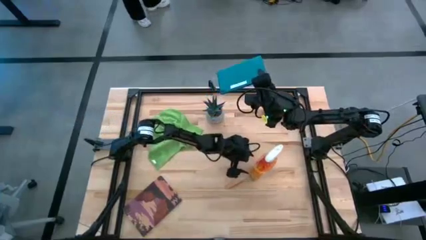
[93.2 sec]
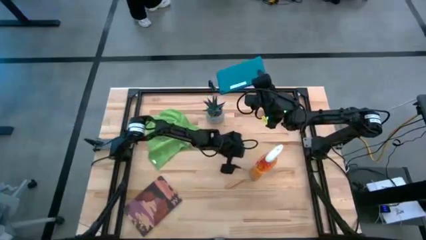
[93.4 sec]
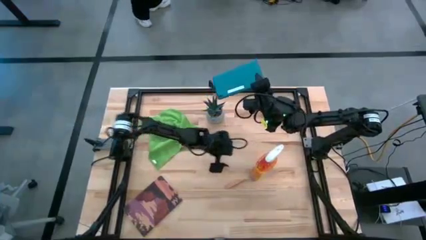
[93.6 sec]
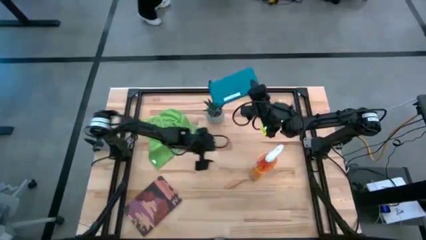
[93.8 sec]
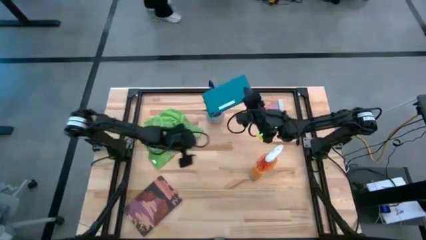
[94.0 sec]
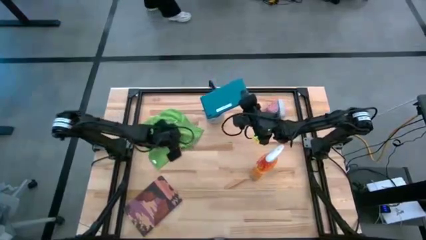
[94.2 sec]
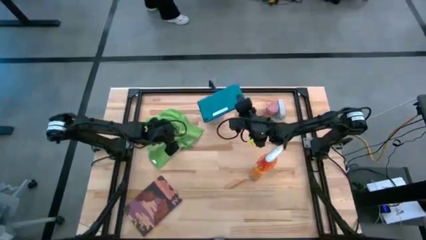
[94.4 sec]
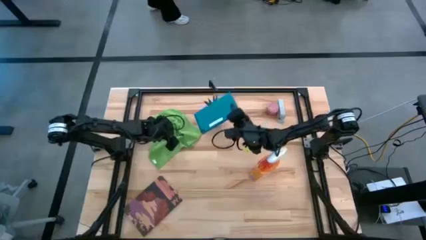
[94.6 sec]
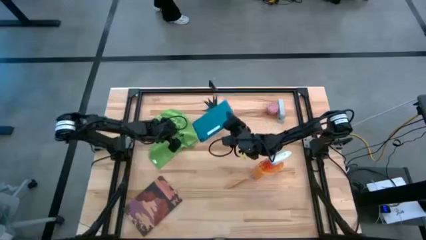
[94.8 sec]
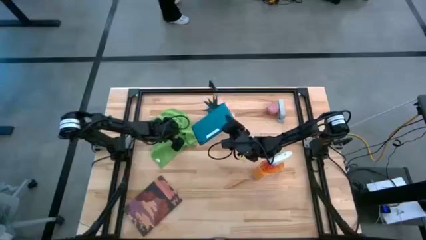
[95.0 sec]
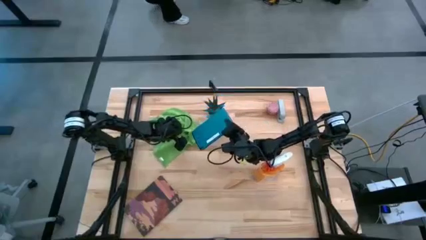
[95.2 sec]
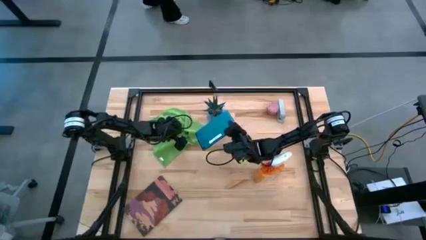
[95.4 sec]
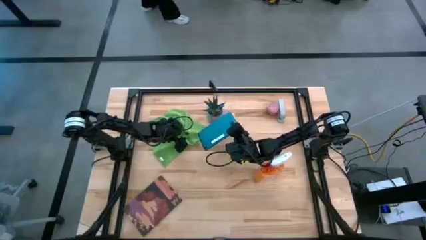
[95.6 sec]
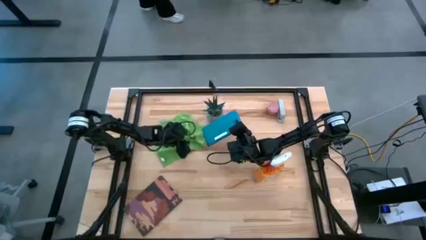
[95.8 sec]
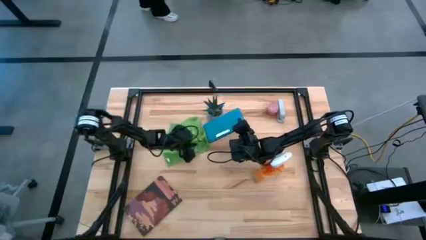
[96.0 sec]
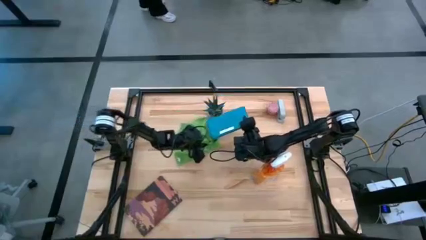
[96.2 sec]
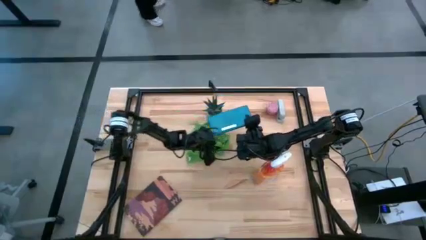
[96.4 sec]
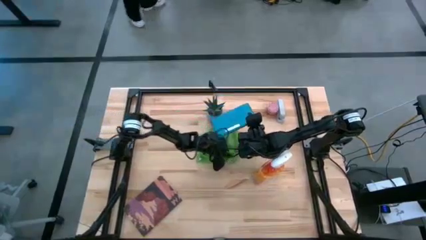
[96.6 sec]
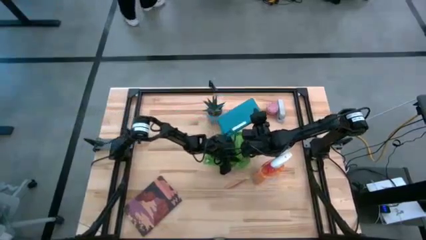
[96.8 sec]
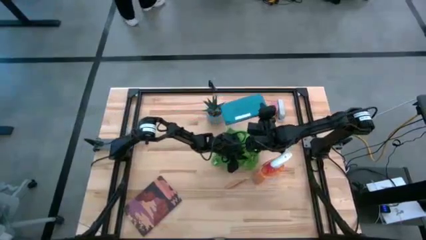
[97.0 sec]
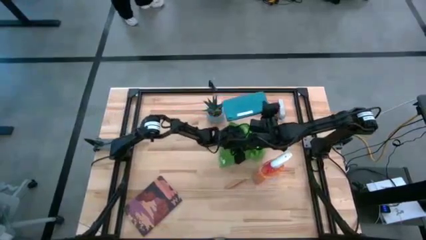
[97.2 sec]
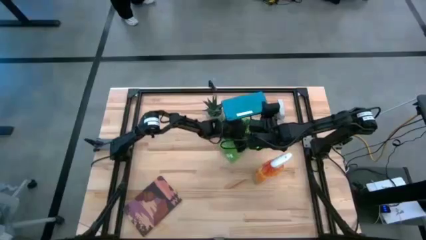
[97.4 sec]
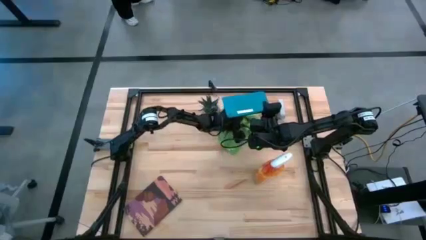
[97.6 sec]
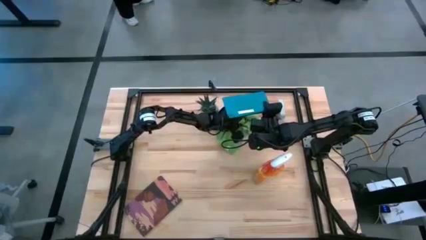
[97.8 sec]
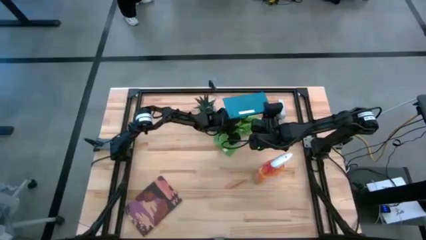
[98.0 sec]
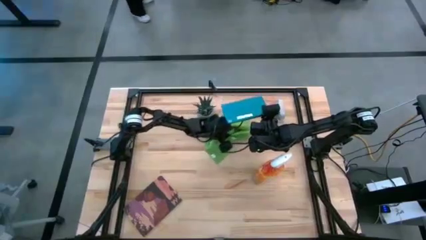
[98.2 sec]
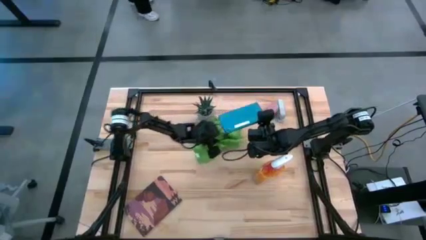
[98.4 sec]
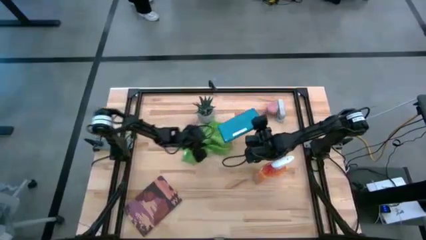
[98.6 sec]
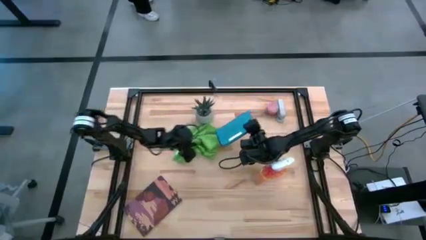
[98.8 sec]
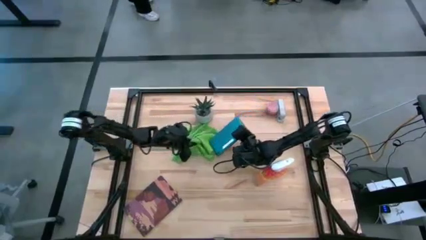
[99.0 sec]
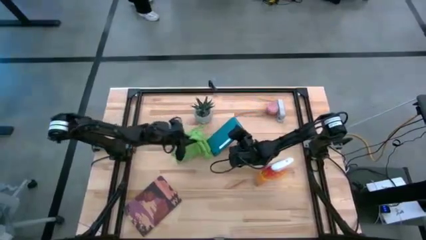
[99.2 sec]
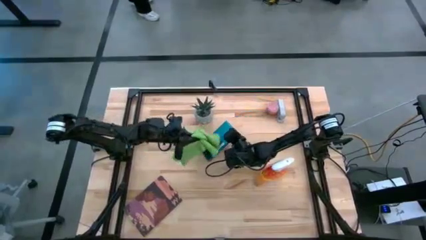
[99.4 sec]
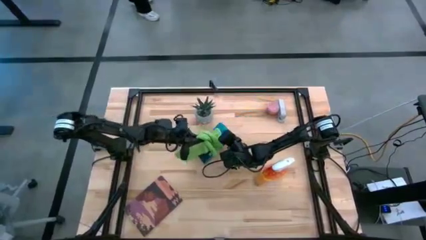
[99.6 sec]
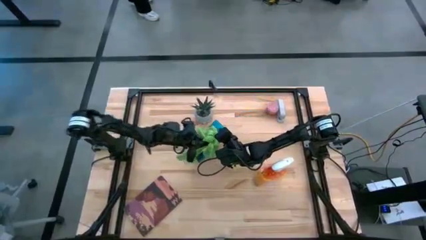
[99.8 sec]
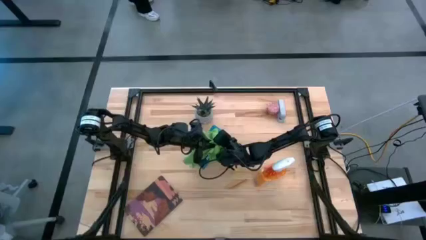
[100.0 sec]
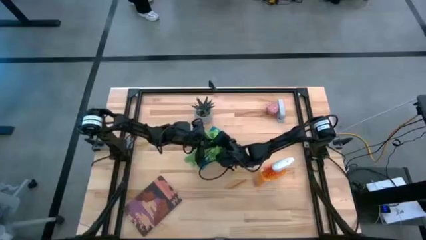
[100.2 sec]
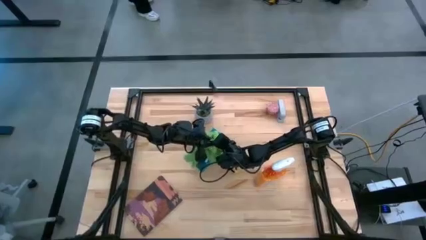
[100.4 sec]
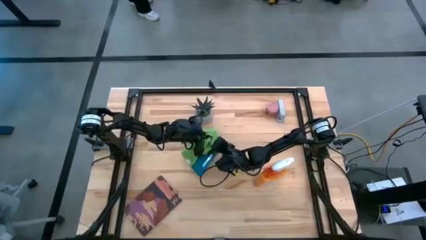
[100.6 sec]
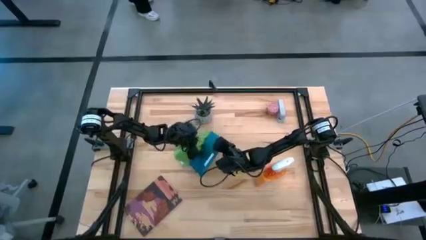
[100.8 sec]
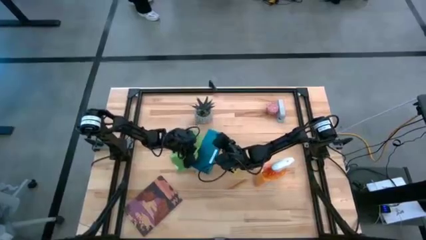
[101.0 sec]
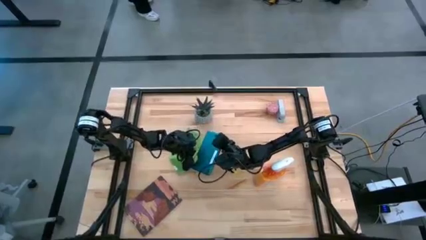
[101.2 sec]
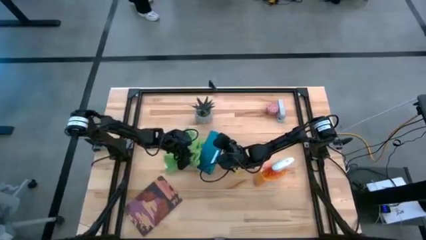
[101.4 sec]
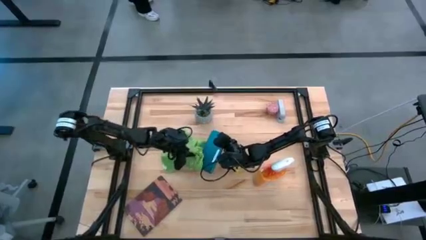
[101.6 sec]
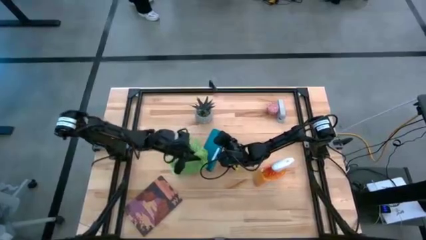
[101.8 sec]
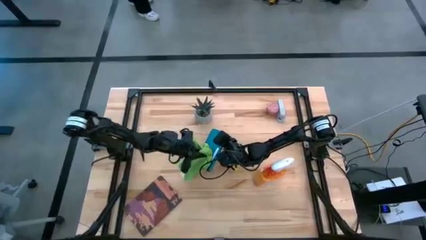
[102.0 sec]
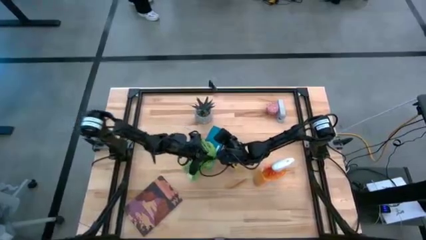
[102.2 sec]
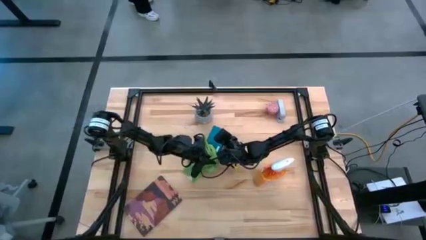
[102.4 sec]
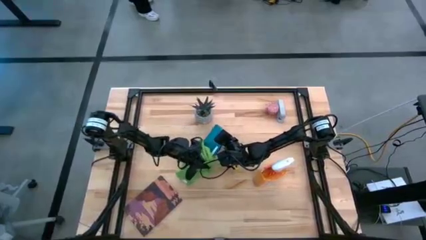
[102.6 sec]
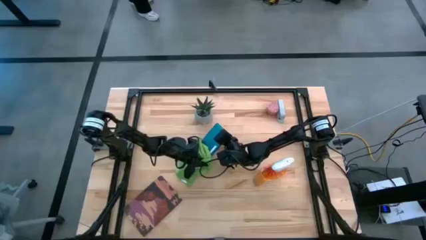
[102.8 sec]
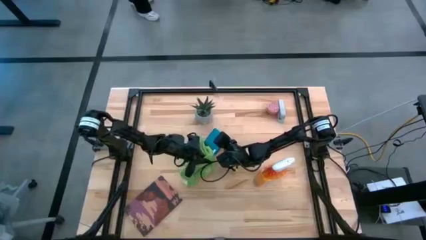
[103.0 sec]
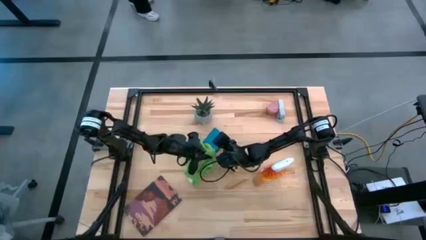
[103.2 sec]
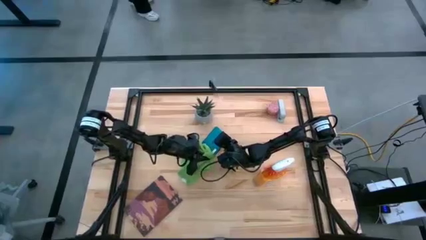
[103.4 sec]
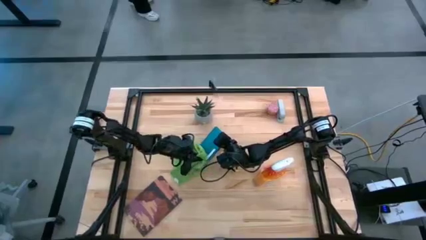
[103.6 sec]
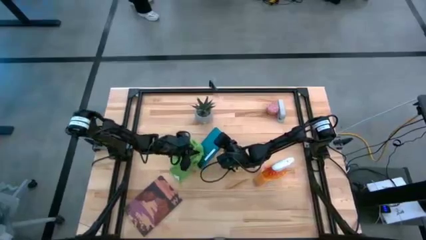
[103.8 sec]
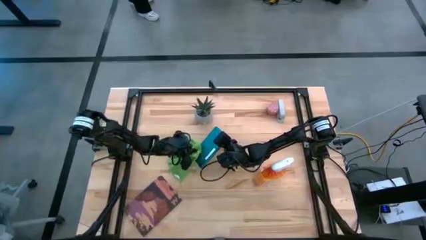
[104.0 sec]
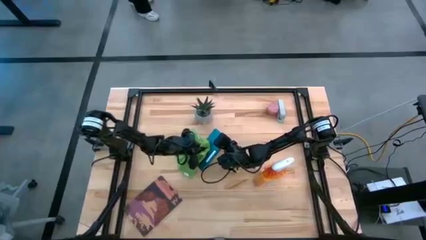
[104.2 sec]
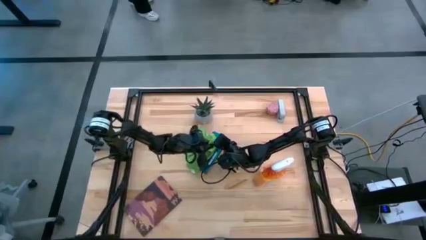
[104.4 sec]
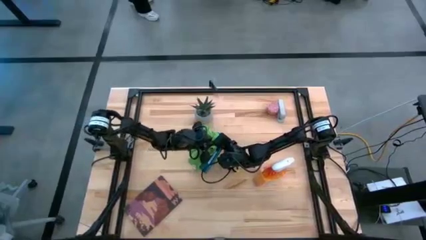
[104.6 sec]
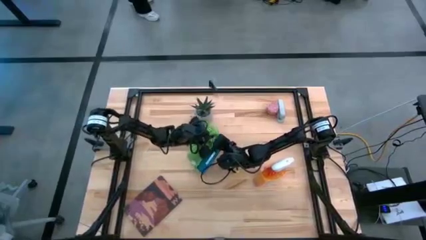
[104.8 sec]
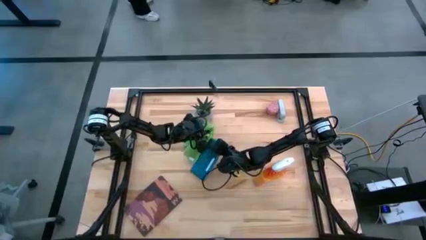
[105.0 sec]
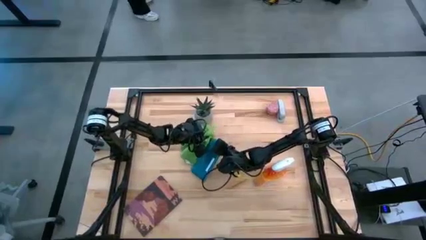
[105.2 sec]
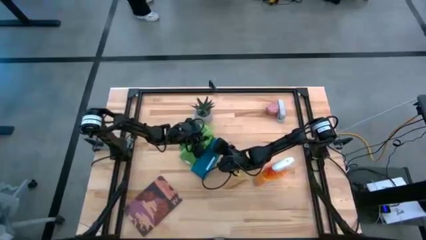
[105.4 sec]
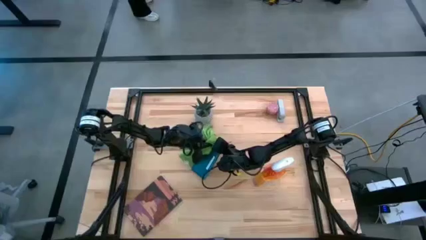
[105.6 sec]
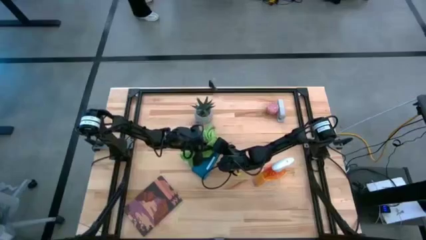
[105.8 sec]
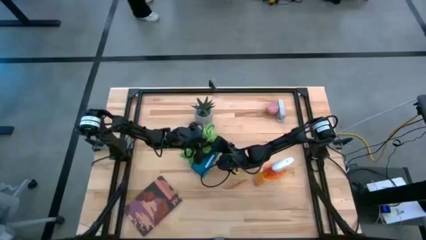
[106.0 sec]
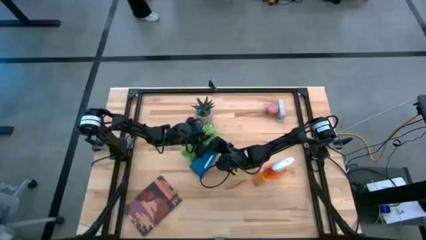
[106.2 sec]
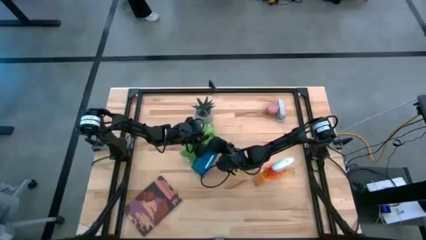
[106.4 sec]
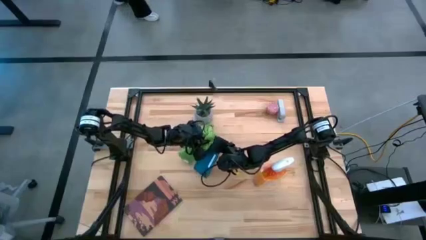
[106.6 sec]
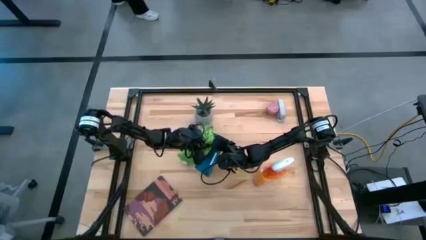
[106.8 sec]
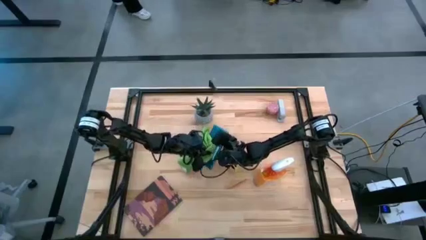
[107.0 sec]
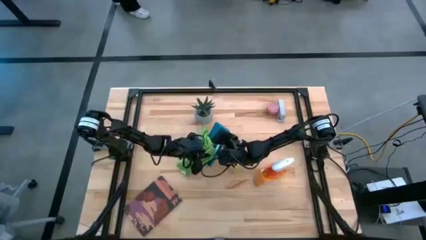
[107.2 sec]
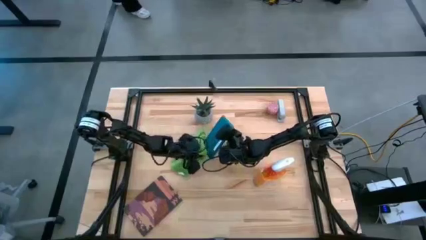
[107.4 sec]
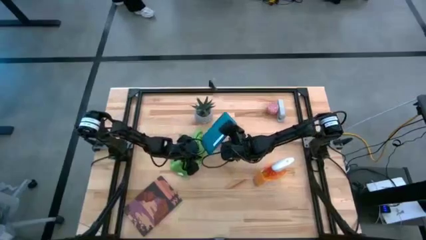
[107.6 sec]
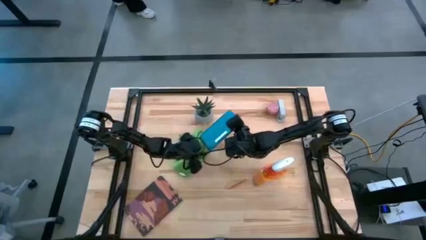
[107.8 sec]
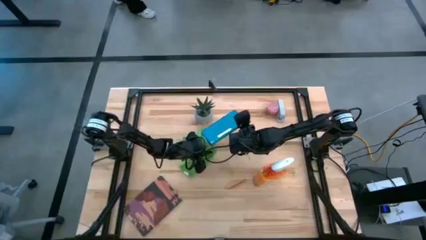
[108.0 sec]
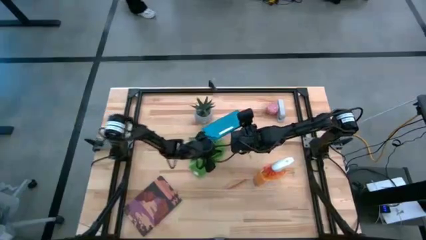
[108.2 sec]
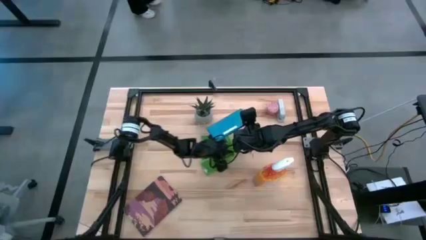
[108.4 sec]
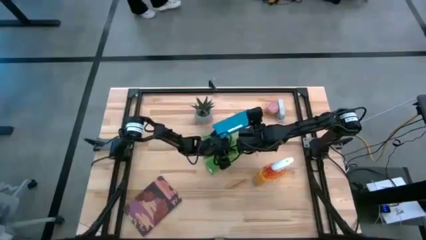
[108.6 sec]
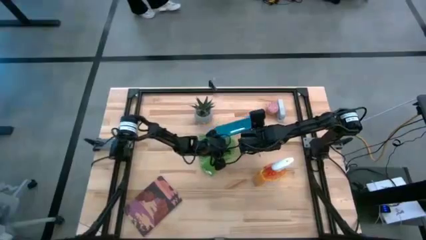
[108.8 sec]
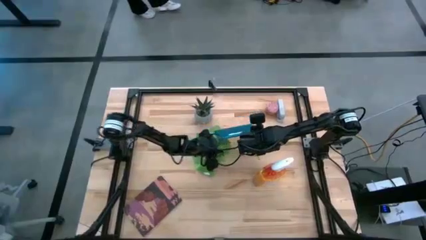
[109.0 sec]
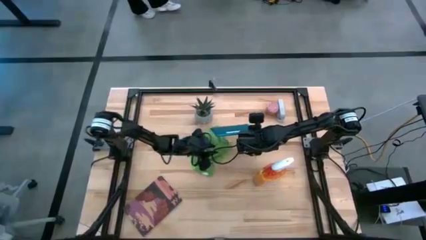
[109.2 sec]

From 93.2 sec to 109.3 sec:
Task: Apply microfiber cloth
Wipe the back of the tablet with the microfiber cloth

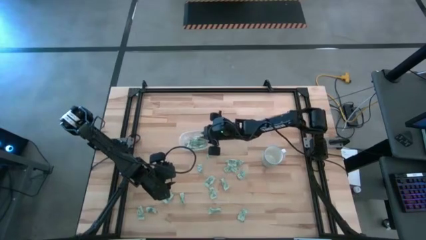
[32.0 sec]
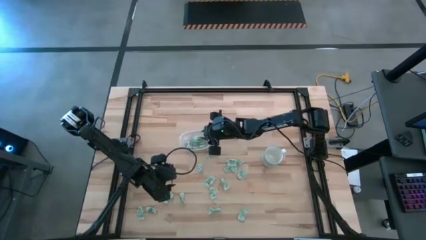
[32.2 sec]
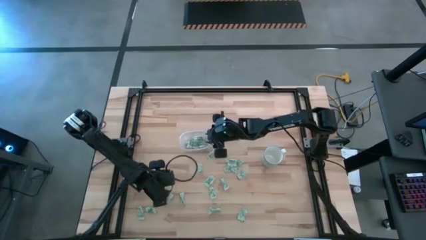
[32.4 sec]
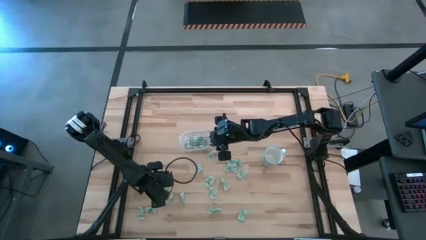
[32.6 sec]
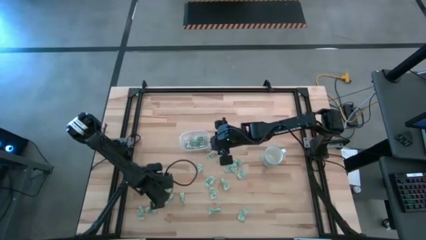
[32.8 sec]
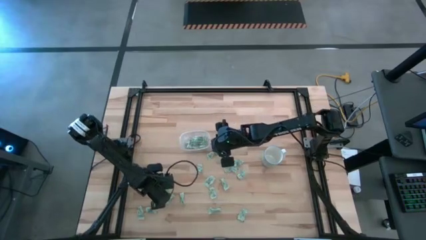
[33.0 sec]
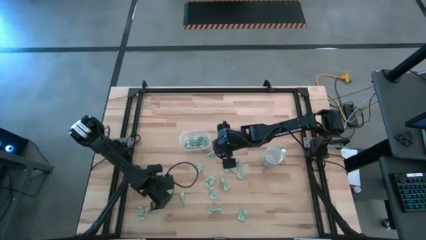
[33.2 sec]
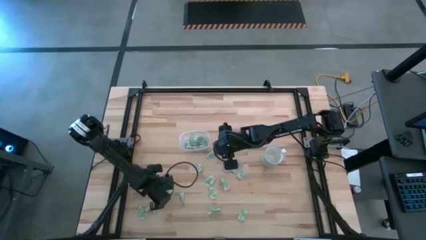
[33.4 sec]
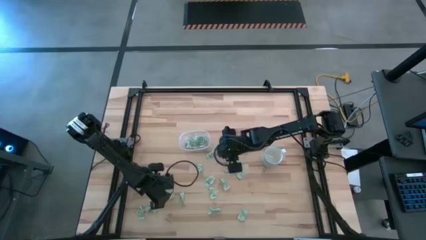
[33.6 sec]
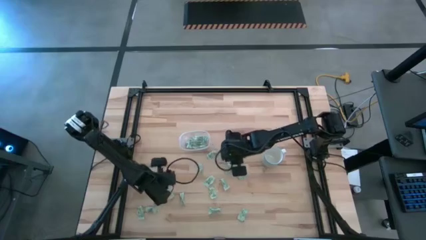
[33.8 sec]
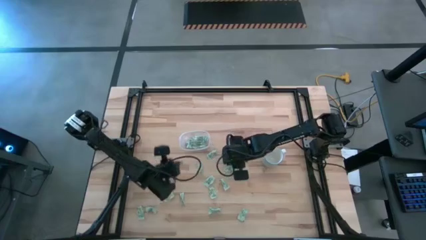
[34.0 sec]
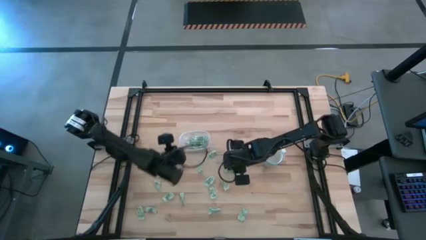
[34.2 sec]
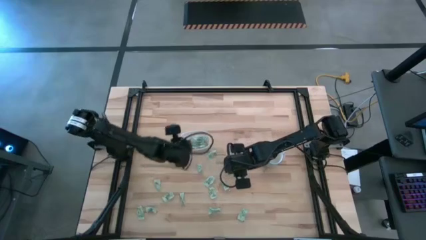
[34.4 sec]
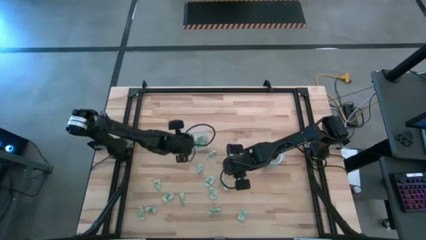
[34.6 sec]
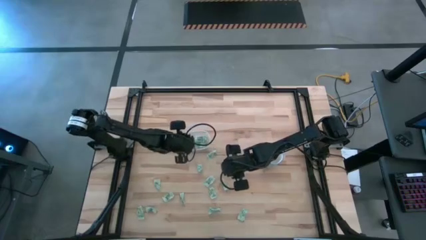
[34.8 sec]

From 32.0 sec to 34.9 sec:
Task: Pick and place Stevia / Truvia into bins
Put the stevia packet into the transparent bin
